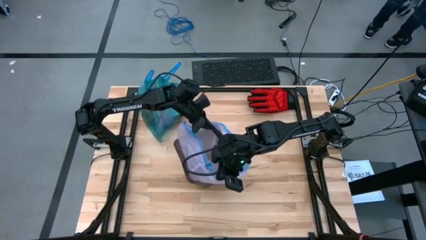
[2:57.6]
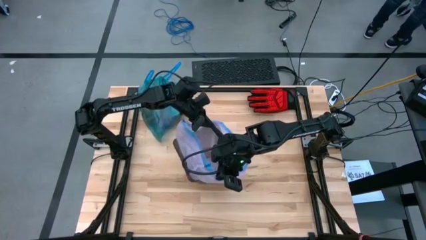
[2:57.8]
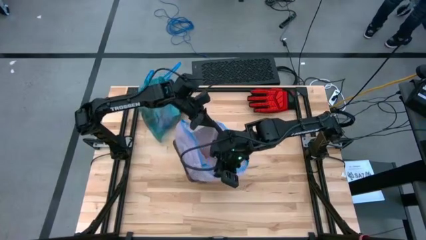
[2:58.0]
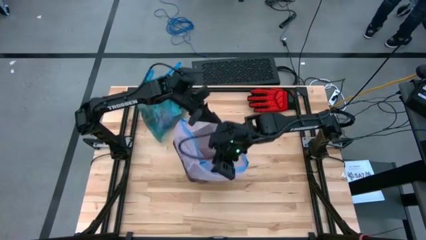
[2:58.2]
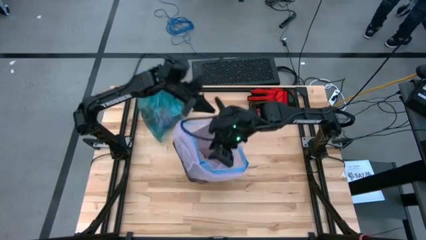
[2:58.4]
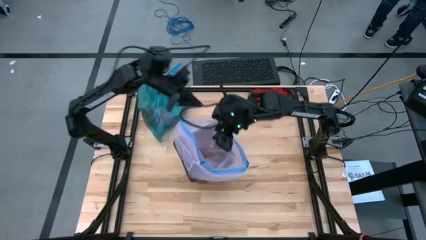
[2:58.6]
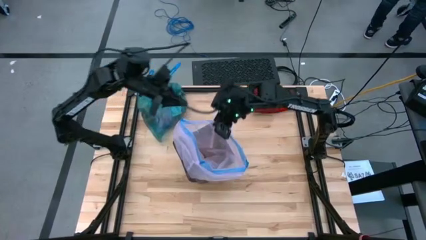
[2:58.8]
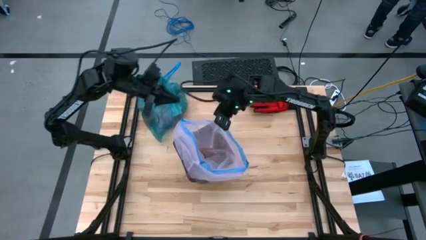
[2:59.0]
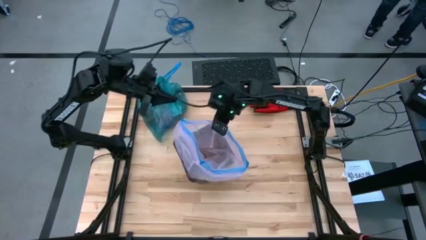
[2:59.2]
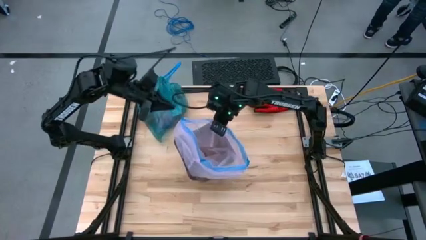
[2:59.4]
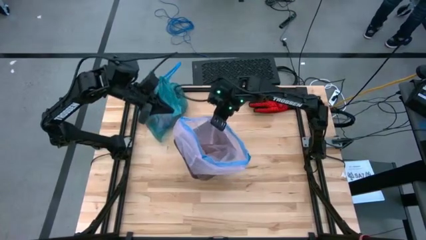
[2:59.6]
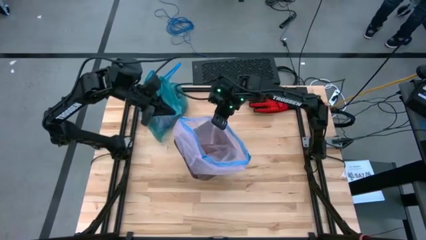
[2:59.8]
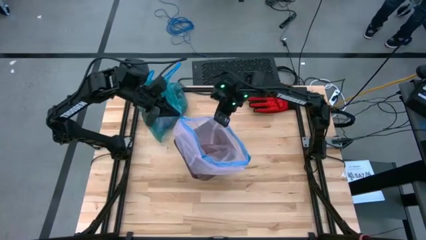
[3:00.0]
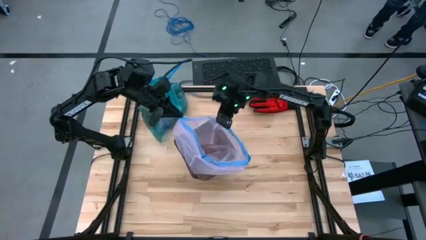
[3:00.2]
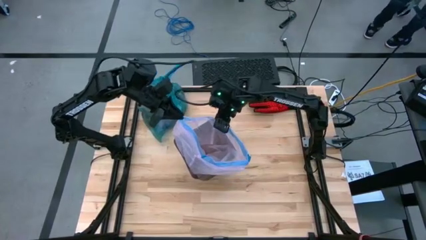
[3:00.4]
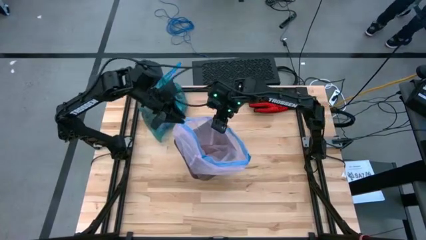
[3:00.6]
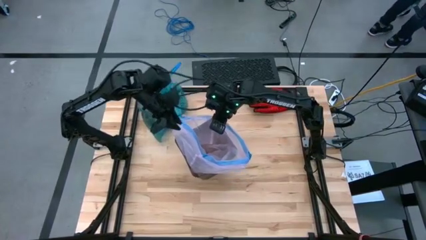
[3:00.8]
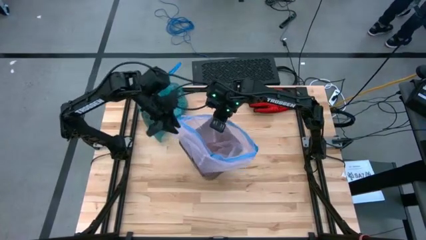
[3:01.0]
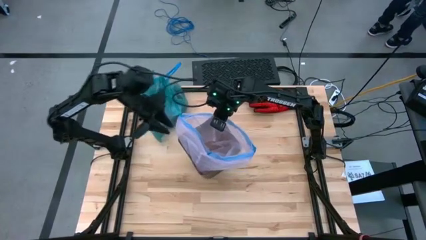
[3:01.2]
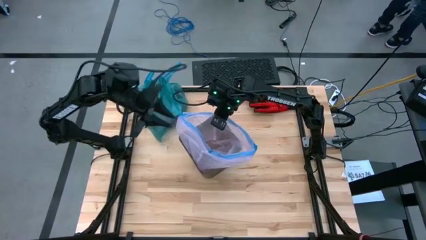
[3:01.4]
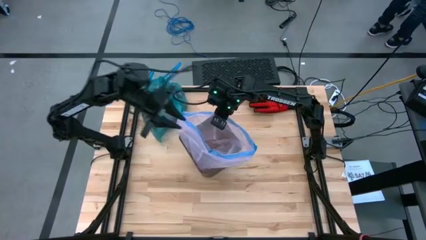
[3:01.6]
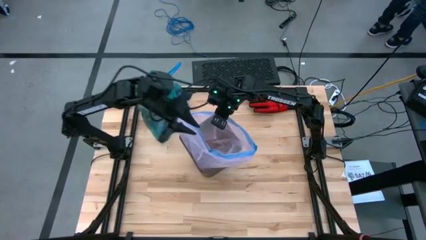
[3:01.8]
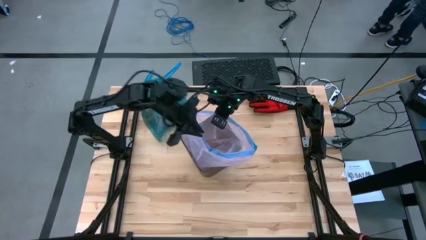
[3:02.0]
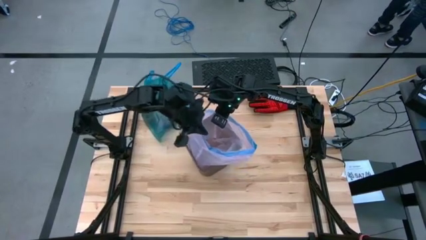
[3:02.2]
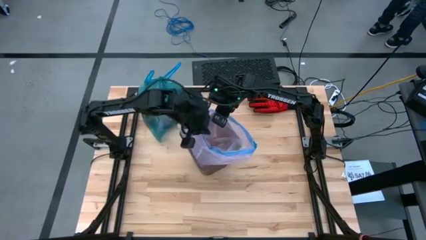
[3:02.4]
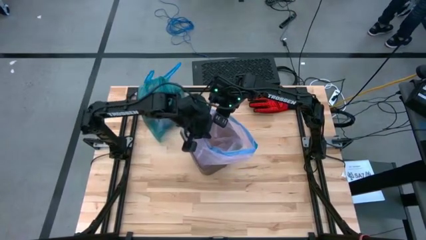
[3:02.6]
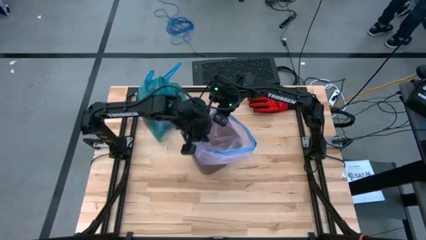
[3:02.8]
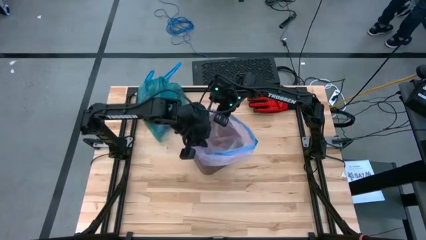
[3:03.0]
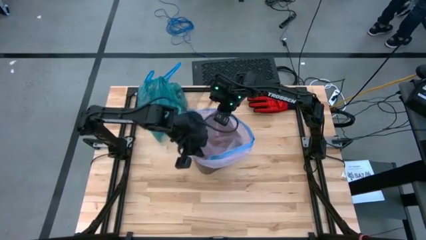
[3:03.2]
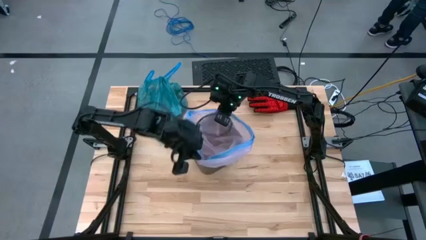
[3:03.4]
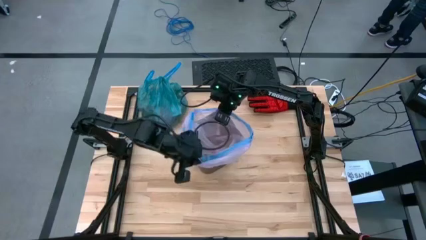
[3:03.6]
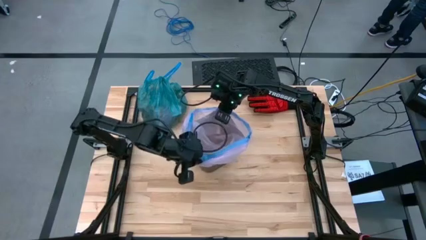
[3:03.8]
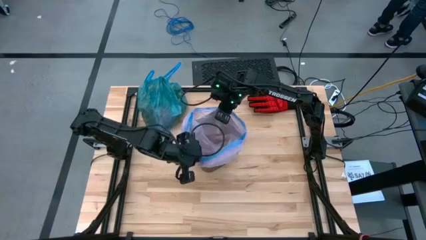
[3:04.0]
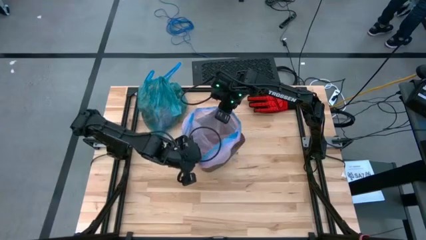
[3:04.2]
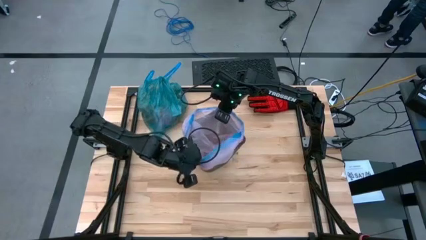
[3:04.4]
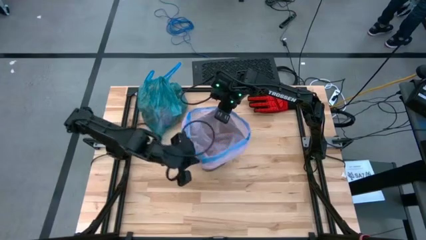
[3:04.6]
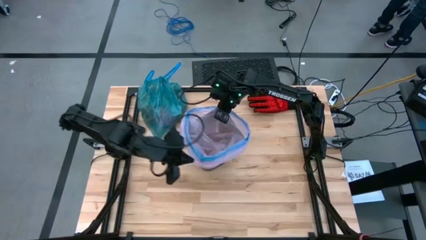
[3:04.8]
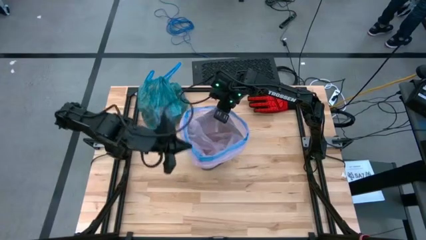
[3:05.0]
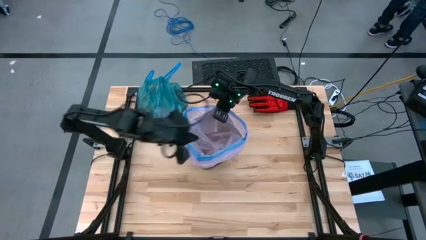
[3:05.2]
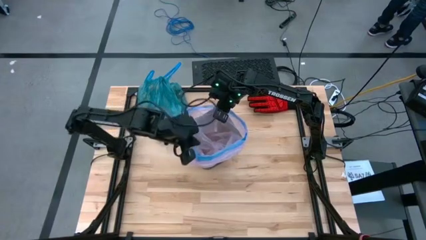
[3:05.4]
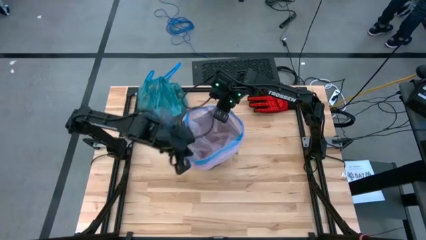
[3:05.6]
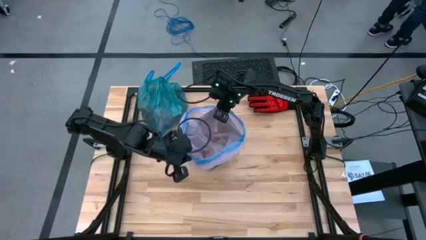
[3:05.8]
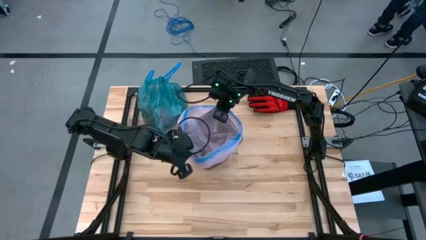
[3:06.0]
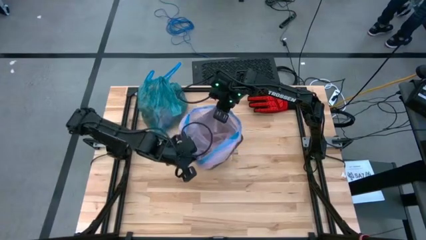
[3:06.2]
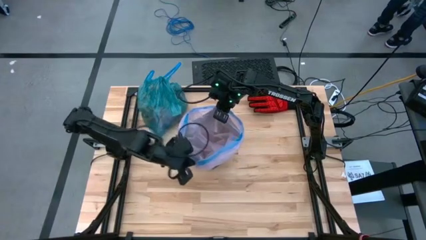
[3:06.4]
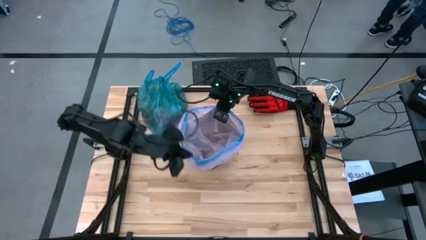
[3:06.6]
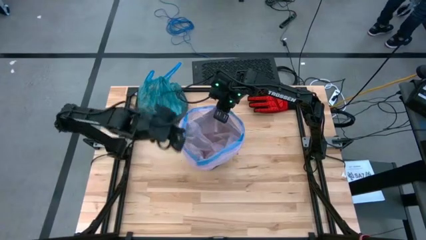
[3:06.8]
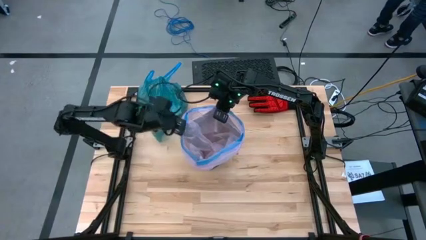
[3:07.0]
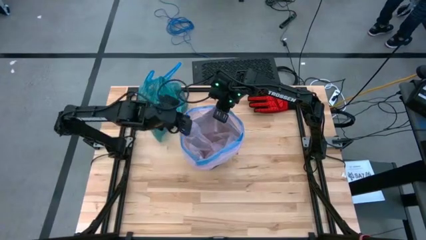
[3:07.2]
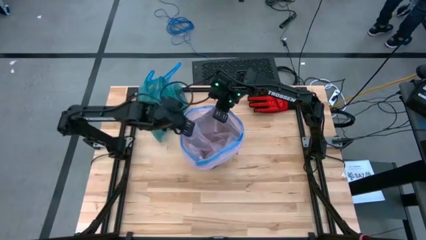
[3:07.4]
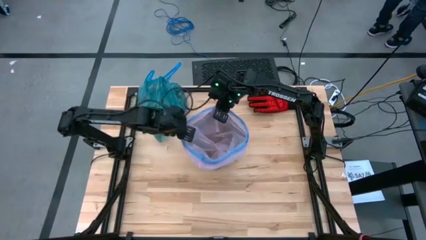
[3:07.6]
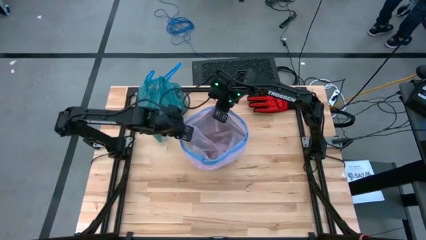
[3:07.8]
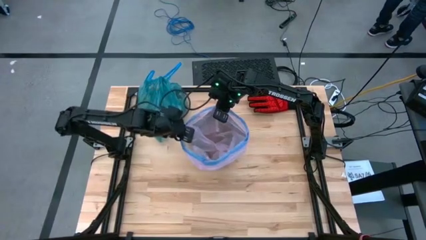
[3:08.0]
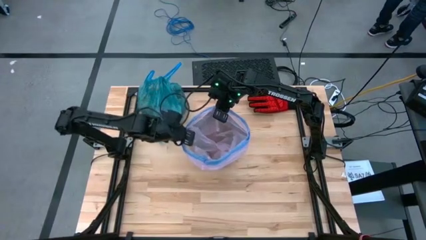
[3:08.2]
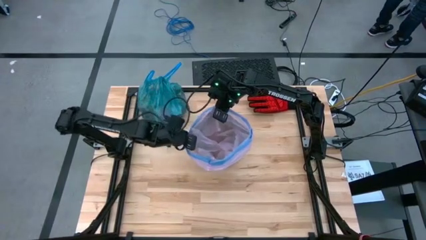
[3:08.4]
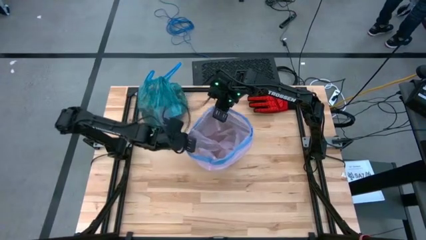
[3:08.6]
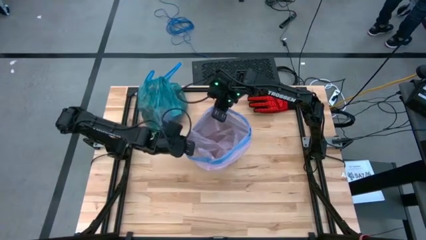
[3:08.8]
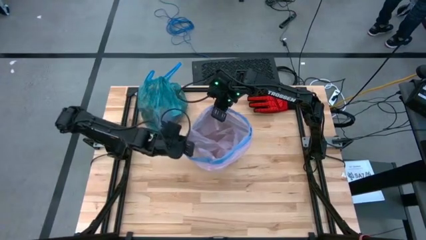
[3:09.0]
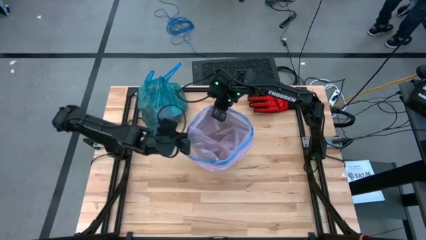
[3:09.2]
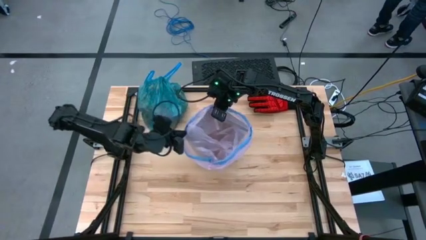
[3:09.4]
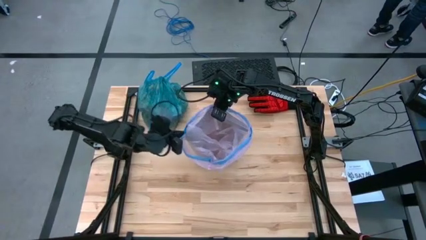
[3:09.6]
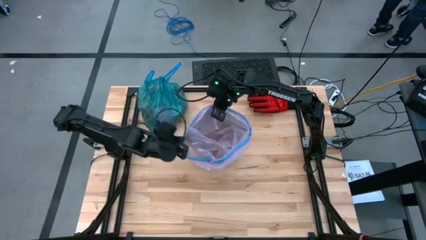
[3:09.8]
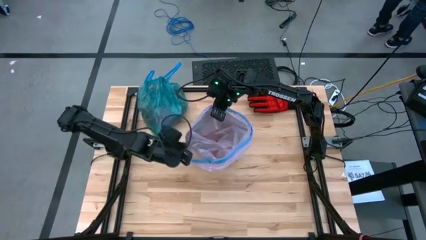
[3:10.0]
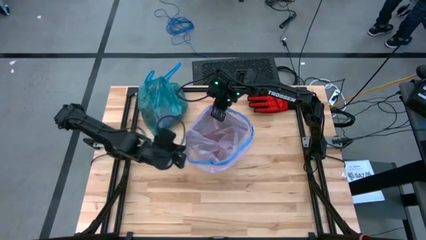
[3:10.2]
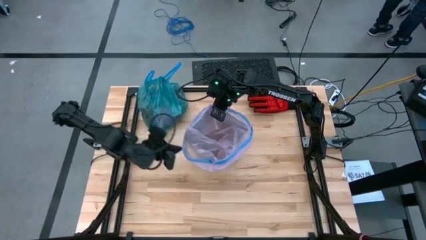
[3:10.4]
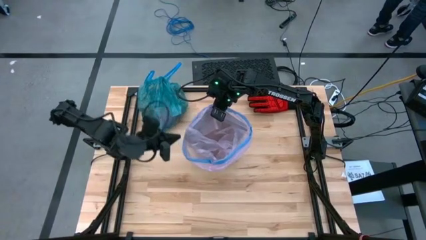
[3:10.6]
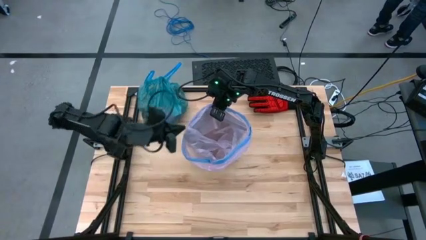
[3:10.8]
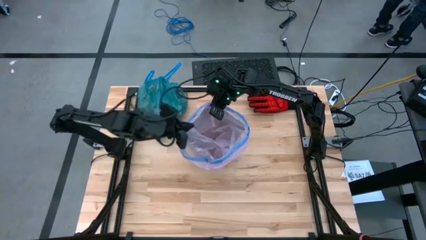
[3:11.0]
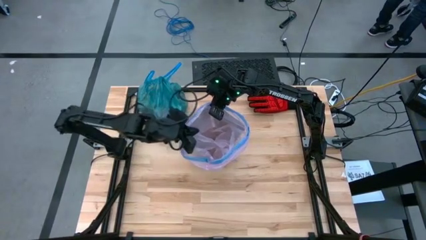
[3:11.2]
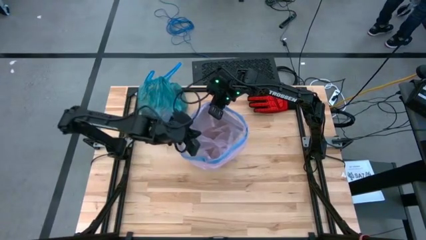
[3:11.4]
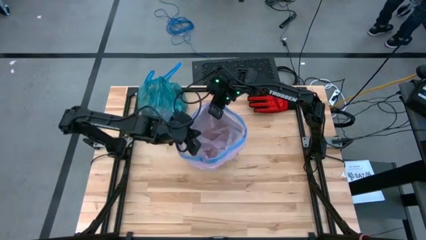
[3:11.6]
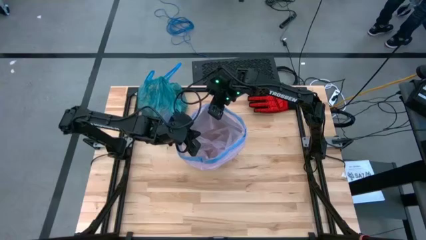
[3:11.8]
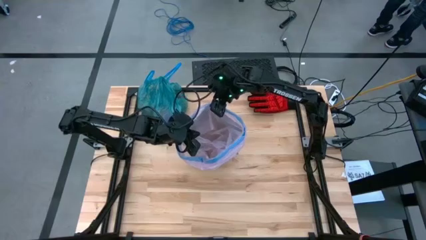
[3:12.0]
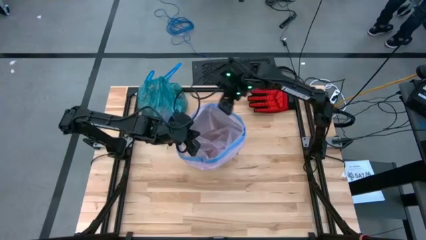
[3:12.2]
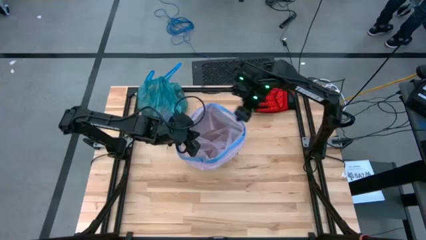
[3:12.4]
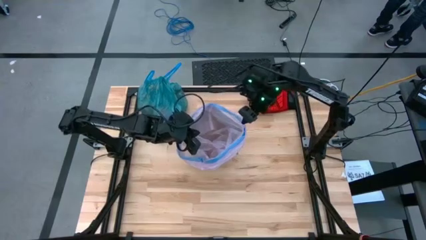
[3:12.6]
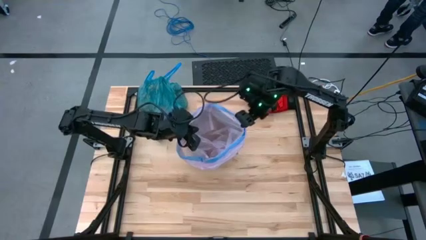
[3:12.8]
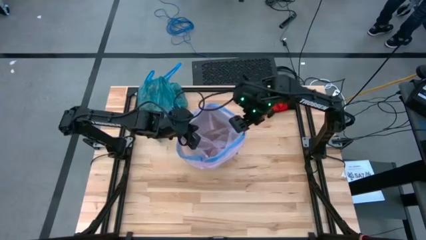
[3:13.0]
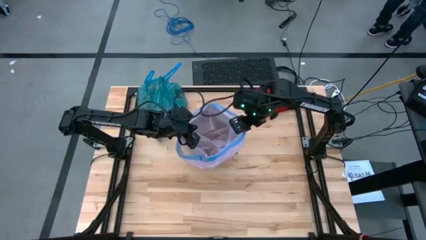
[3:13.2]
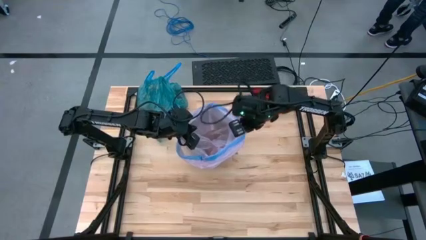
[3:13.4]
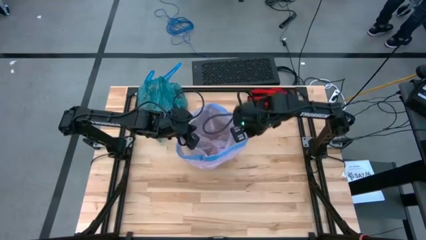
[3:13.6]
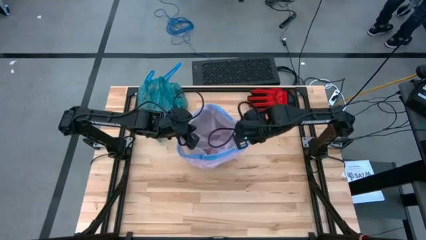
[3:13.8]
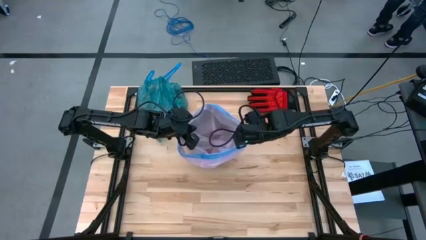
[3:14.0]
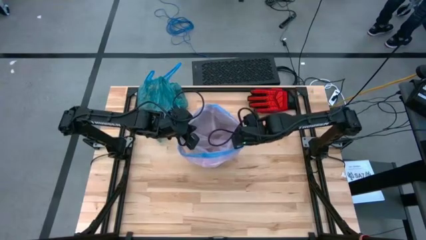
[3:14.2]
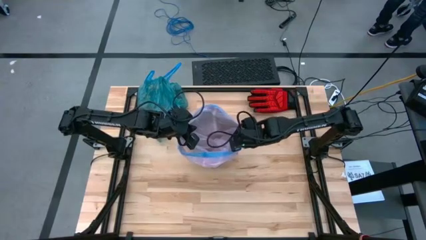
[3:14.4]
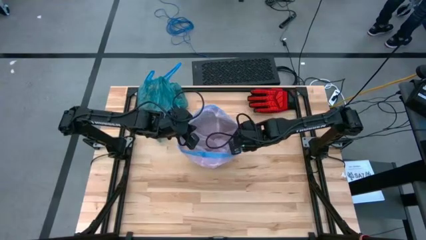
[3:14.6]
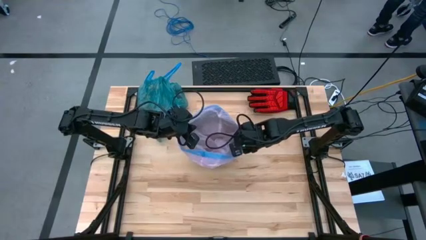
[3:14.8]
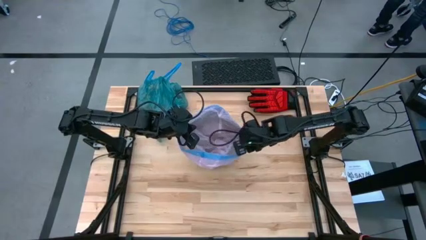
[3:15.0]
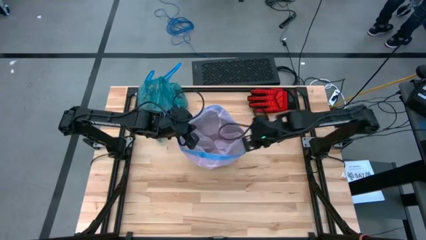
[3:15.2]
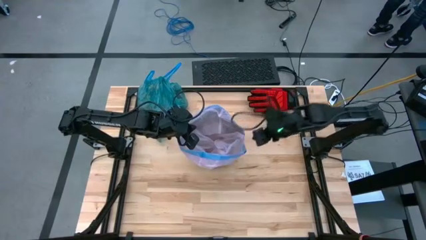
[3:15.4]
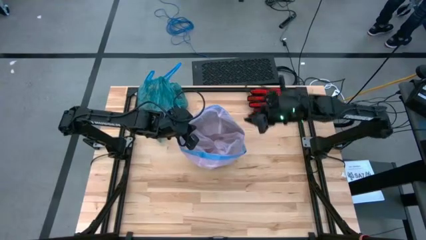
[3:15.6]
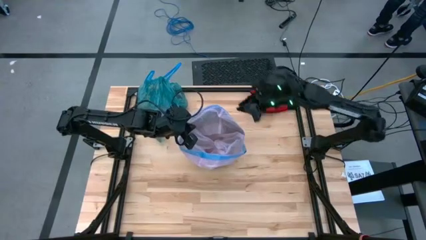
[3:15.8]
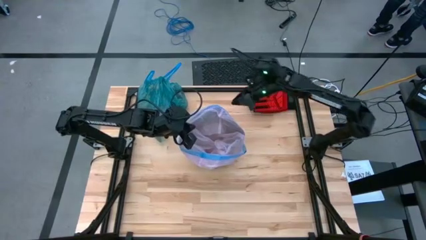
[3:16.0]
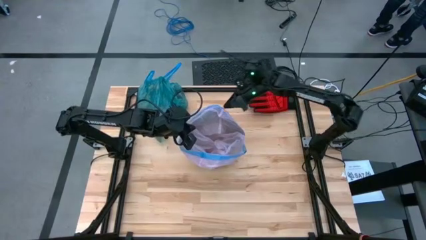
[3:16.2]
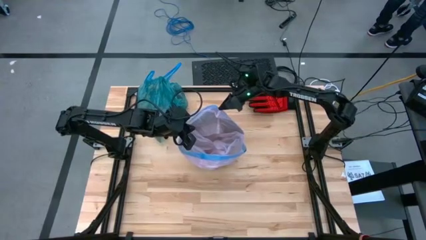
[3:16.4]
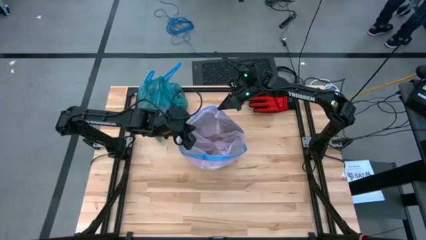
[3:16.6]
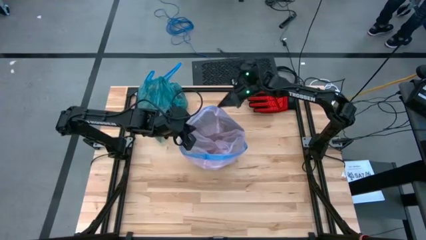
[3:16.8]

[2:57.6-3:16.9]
Task: place trash/remove bag and relplace
Insert the new pink trash bag into the trash bin
